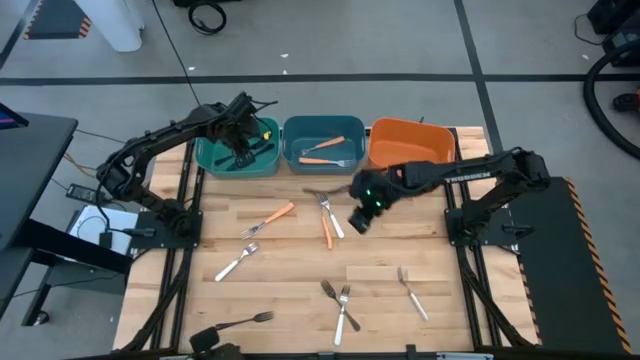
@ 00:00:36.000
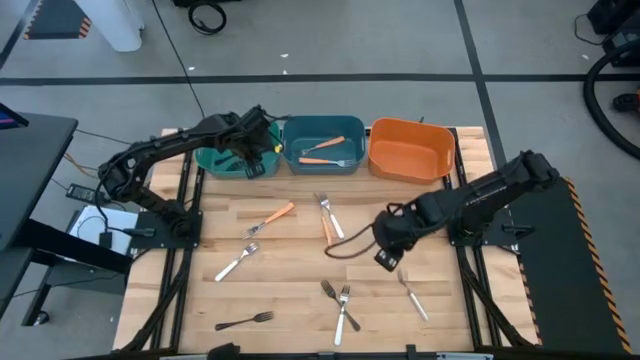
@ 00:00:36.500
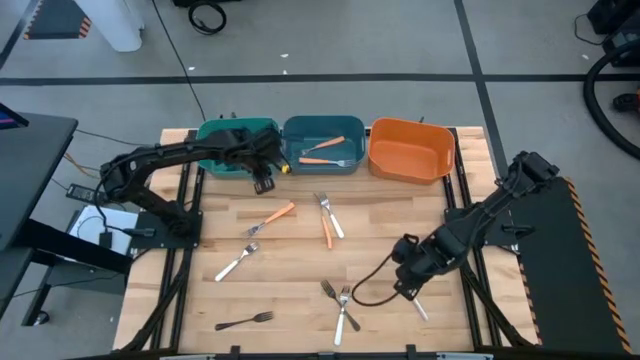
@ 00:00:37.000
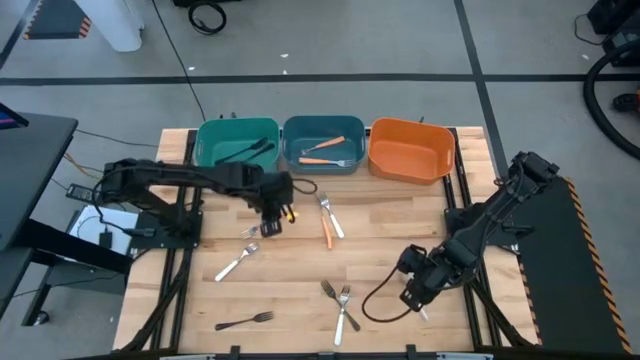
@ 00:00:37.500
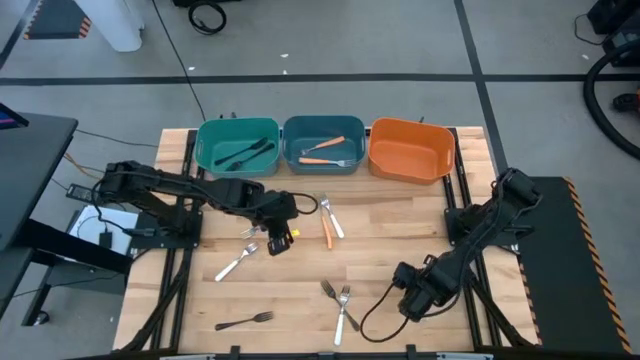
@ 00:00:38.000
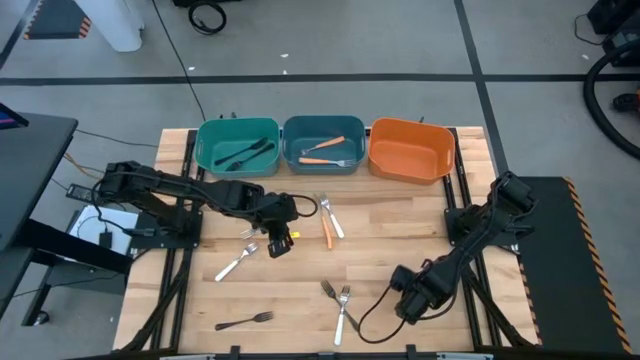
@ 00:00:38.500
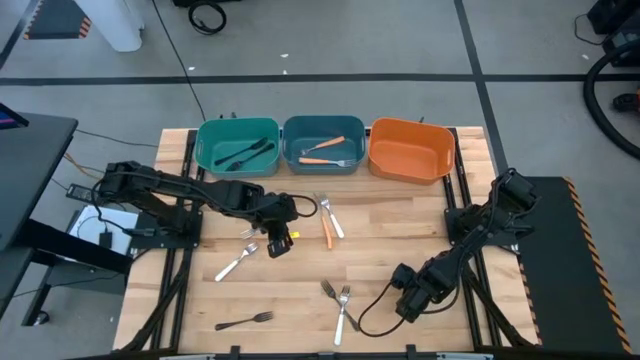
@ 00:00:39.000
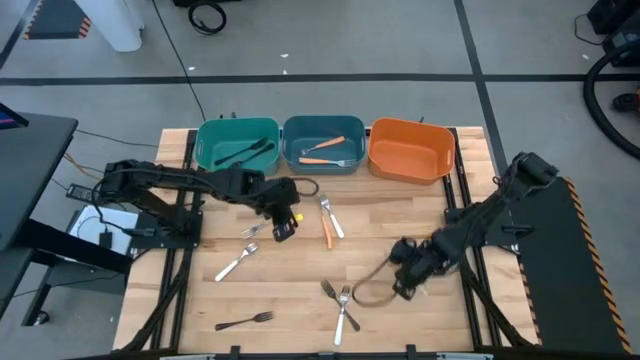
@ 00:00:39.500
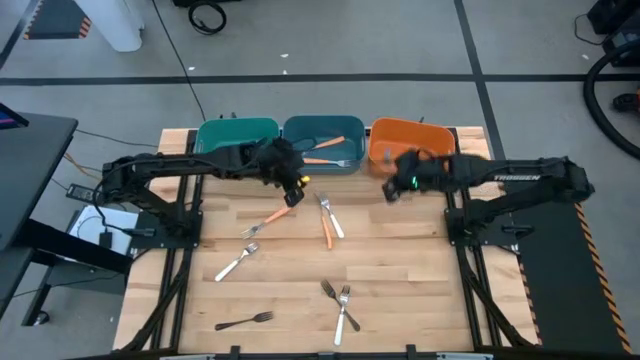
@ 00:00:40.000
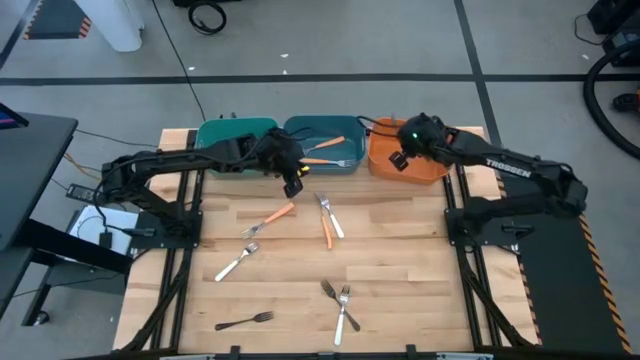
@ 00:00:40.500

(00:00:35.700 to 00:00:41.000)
Task: Sort silverware by color (type)
Put the bottom right white fork in the orange bin

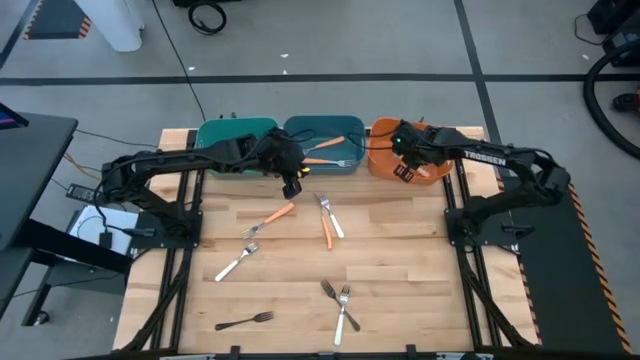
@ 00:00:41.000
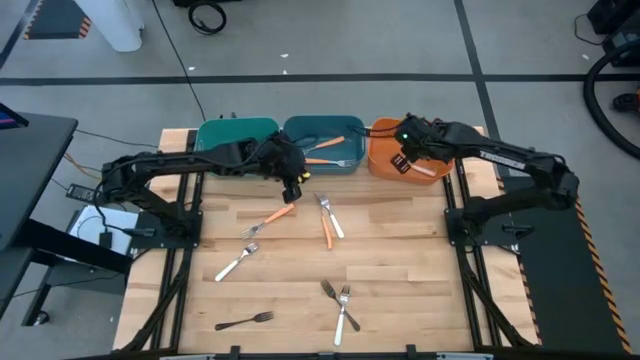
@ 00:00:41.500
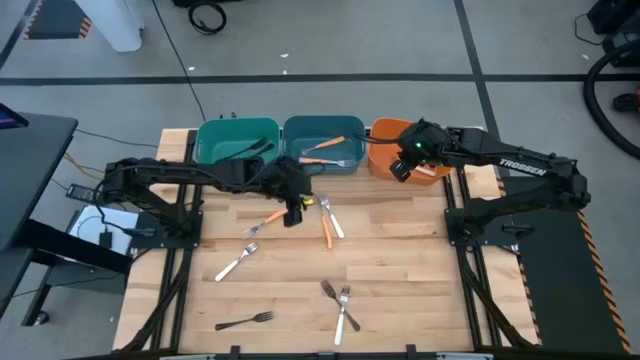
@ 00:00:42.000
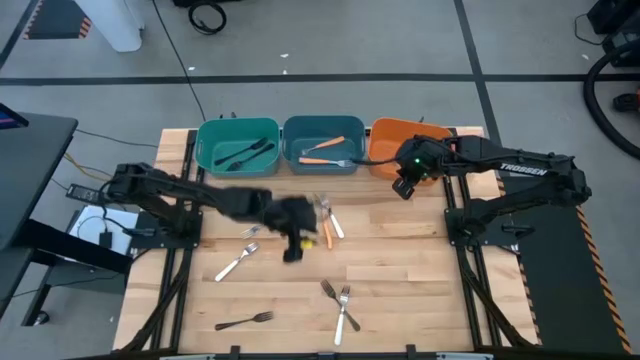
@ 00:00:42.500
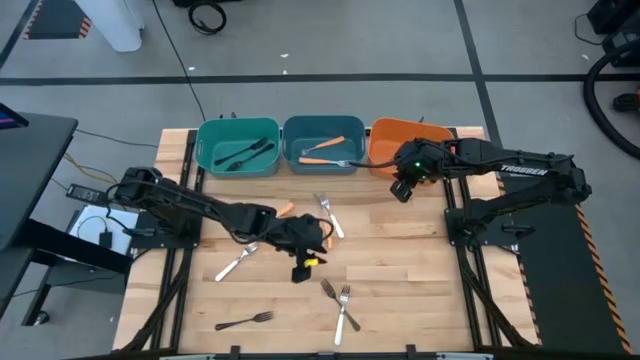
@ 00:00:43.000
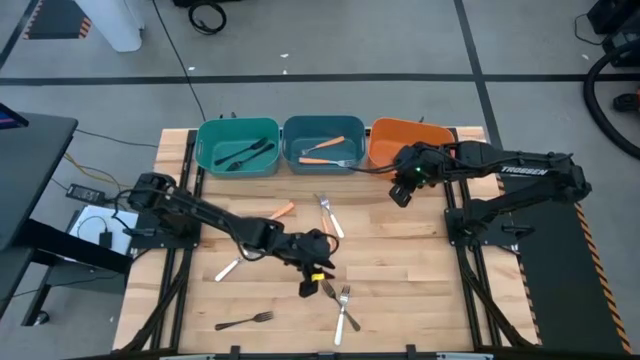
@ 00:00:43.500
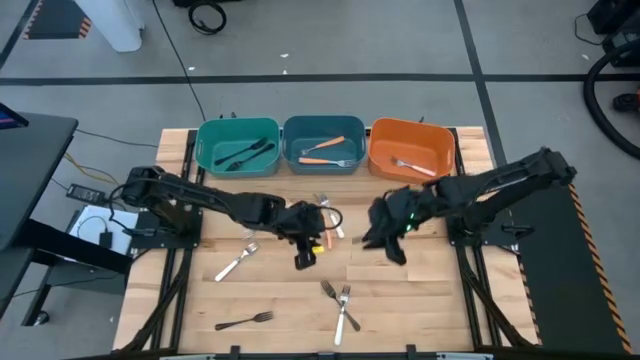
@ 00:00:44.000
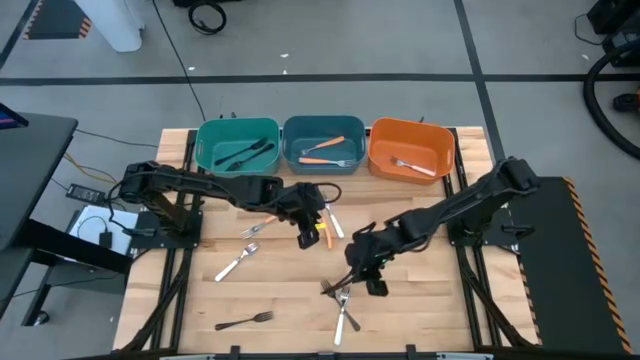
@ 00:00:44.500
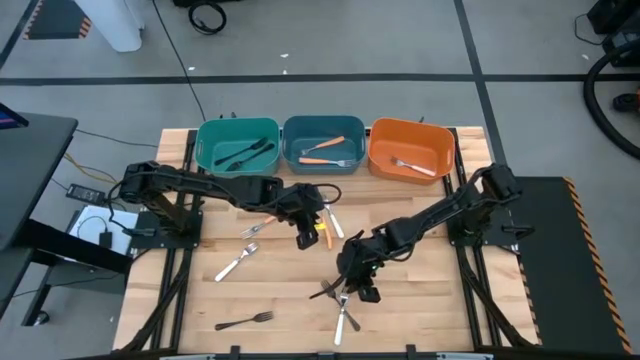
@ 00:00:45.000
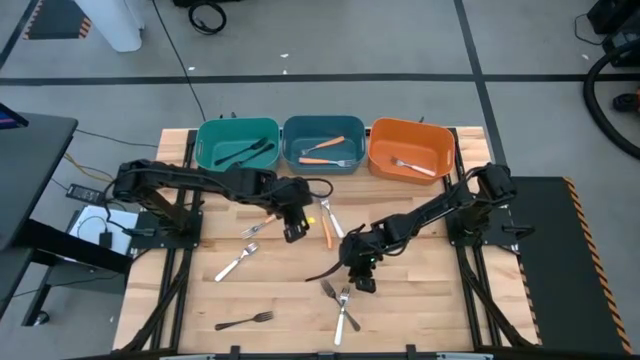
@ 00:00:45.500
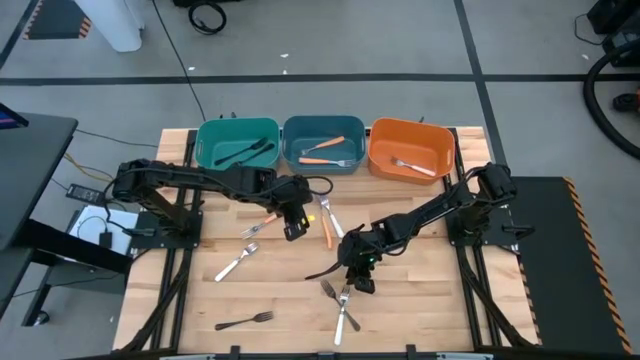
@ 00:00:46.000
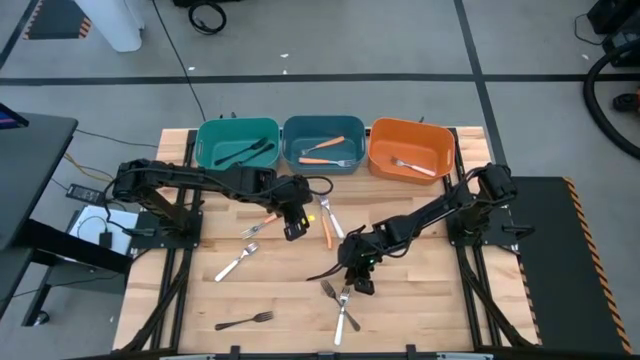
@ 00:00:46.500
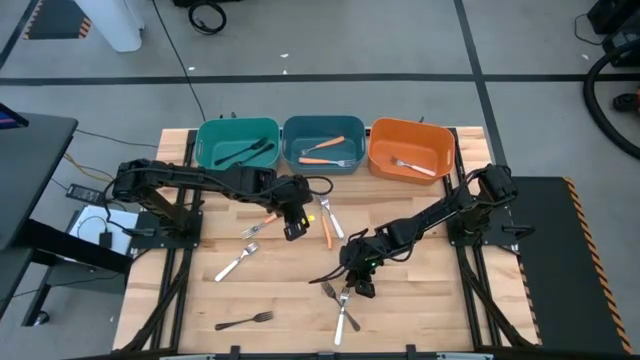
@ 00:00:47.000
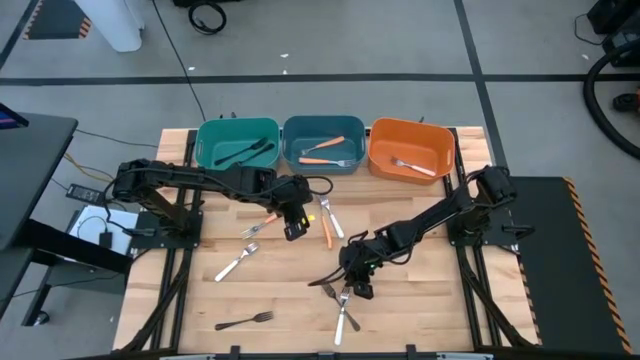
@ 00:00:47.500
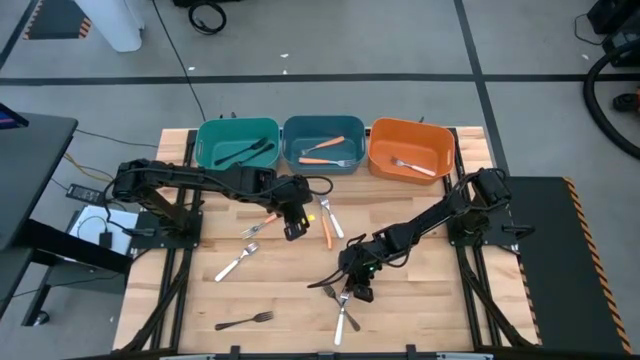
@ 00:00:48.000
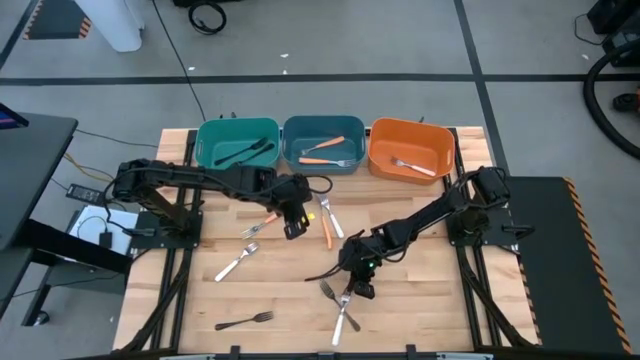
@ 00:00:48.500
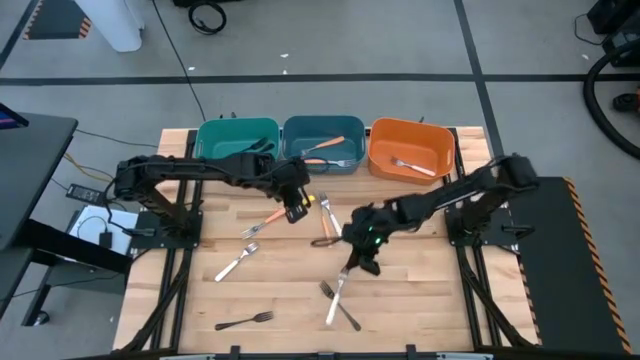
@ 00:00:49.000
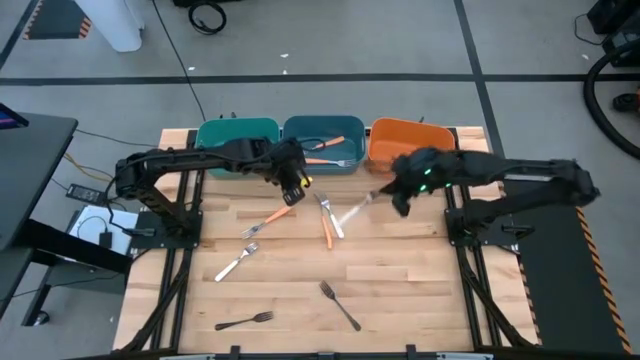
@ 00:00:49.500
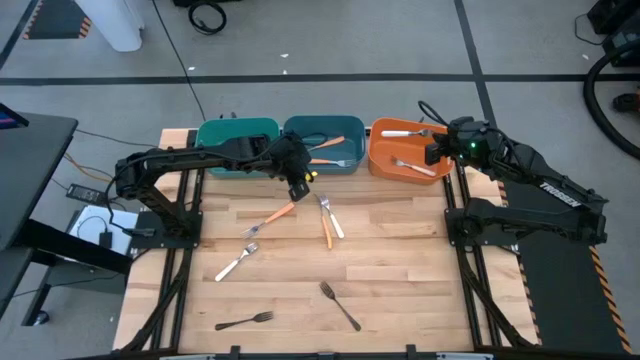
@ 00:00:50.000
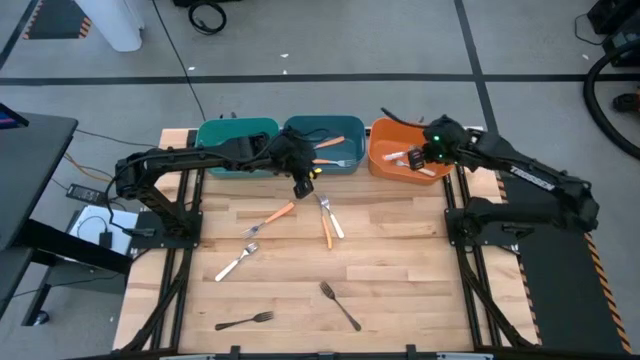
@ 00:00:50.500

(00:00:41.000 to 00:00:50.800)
Put the bottom white fork in the orange bin

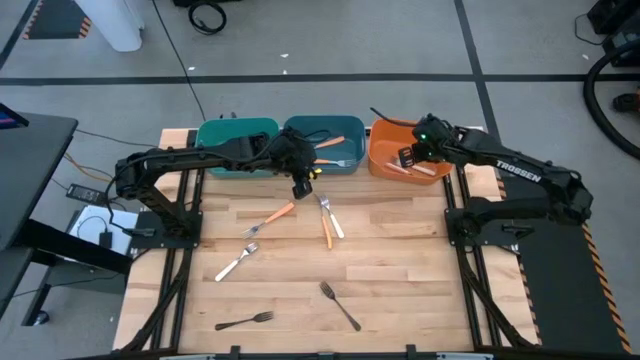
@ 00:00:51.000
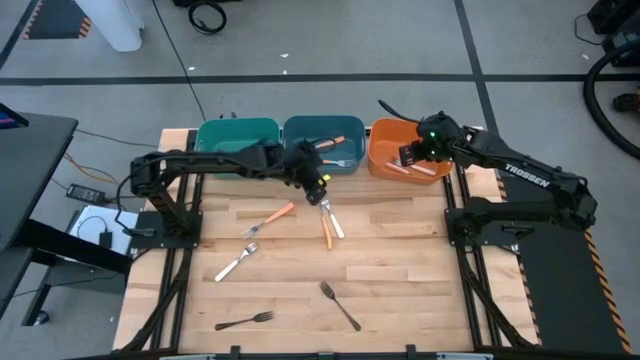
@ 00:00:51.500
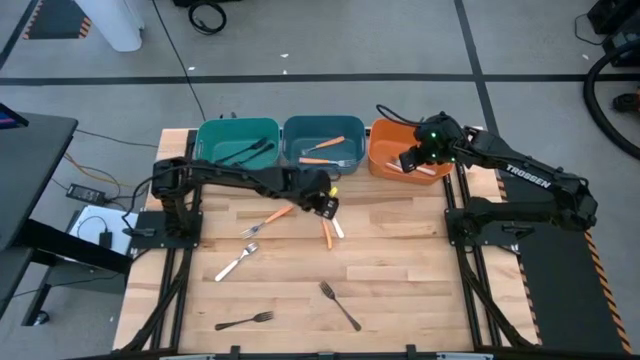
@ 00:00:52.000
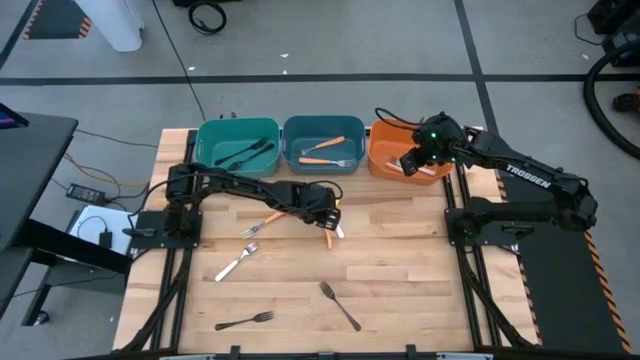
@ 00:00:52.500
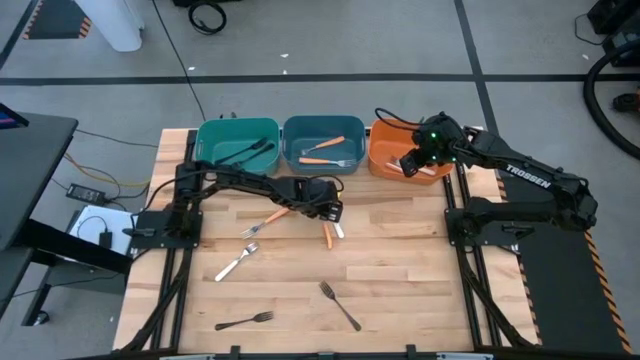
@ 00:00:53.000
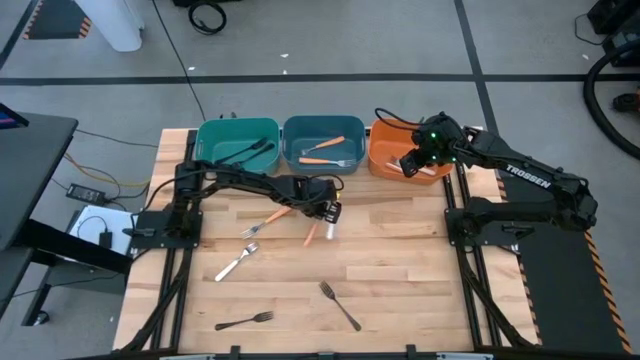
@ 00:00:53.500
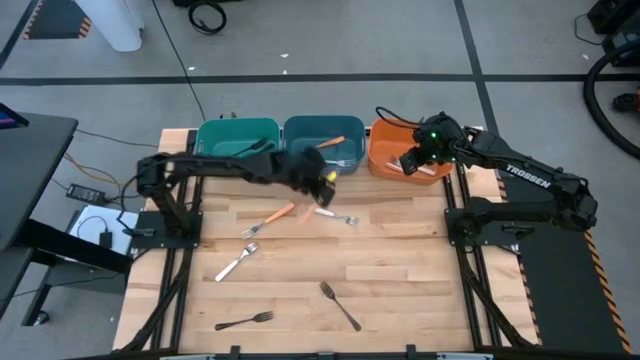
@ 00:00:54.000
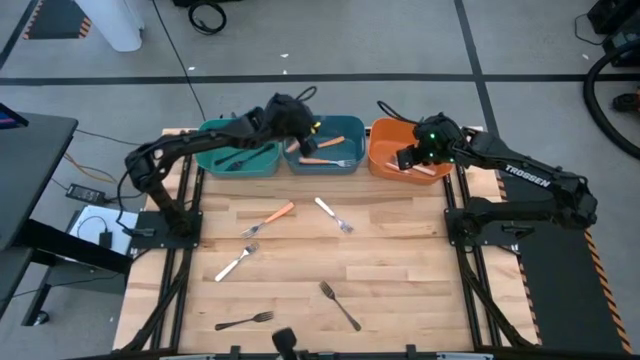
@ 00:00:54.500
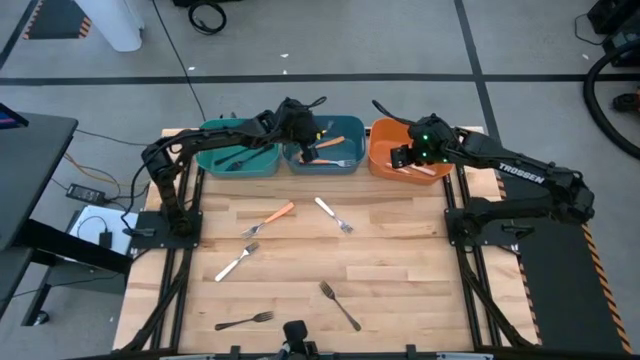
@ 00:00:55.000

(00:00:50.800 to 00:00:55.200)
Put the right orange fork in the blue bin

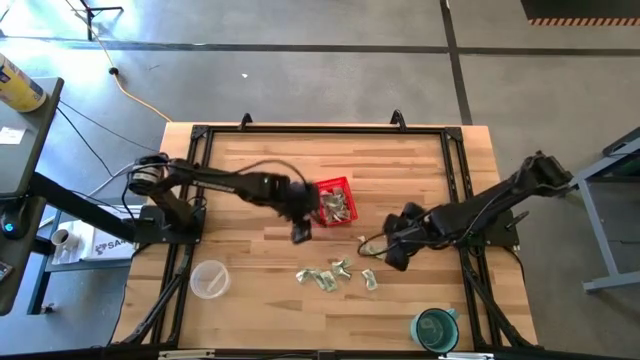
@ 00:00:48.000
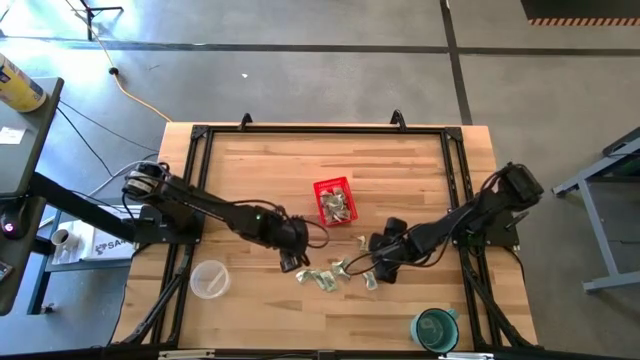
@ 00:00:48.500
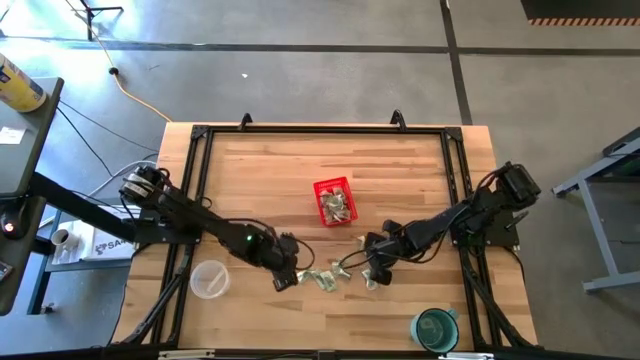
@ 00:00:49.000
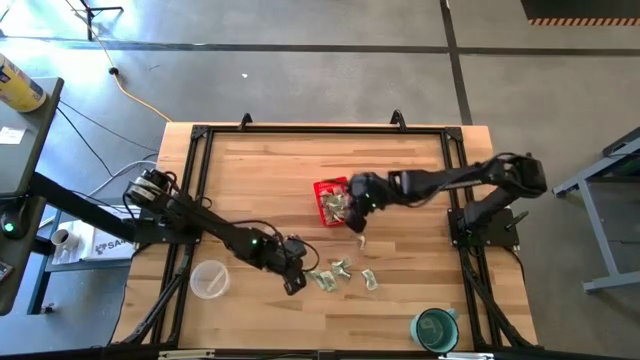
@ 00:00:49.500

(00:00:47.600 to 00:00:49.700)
Task: Pick and place items into bin
Put the light green stevia packet into the red bin

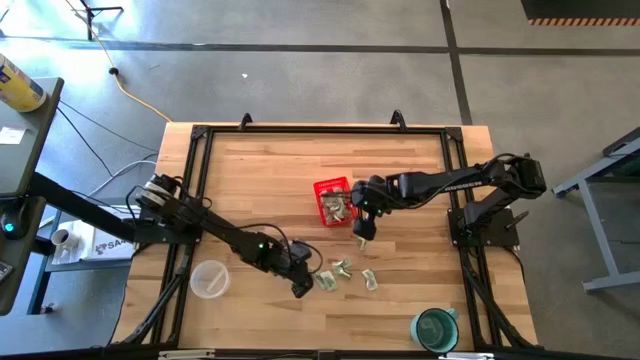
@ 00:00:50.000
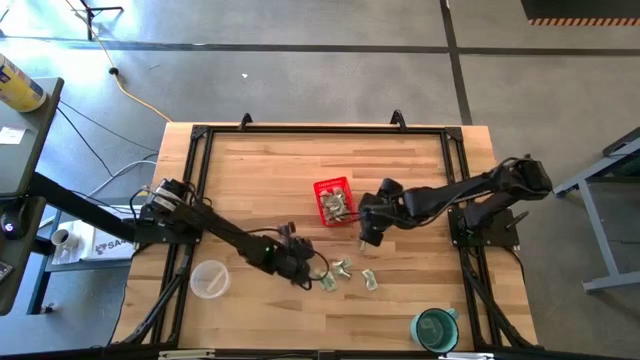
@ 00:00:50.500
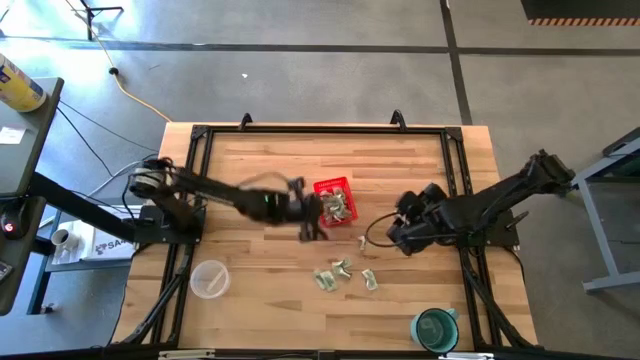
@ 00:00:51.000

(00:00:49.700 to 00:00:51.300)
Put the light green stevia packet into the red bin
